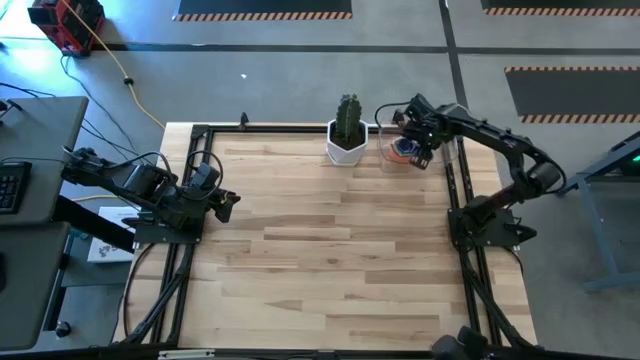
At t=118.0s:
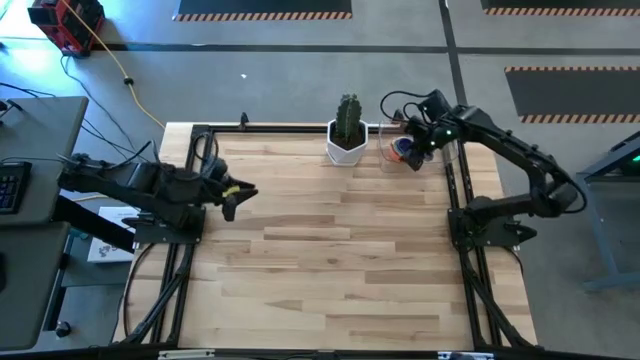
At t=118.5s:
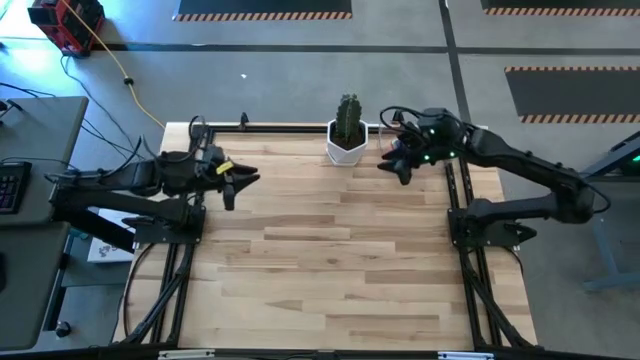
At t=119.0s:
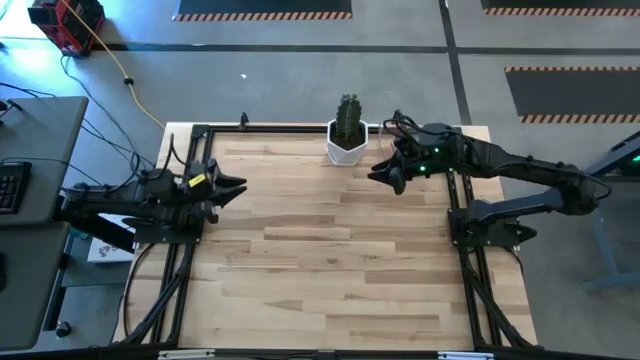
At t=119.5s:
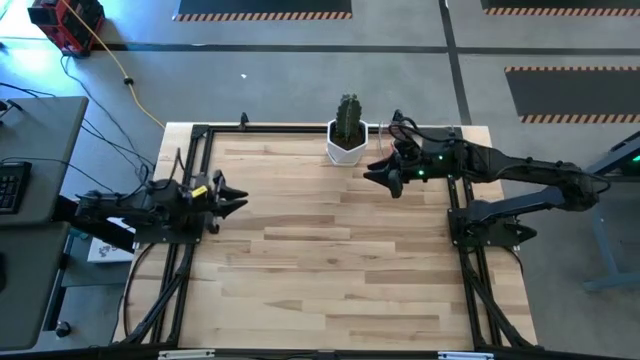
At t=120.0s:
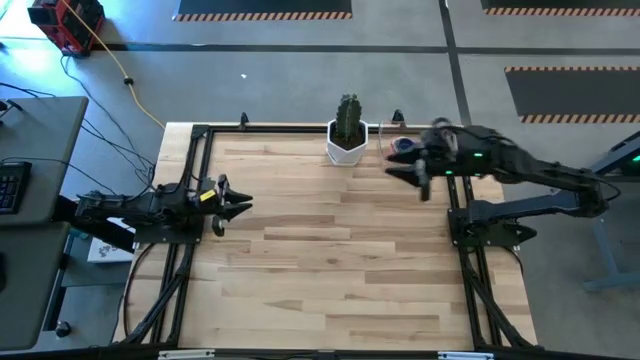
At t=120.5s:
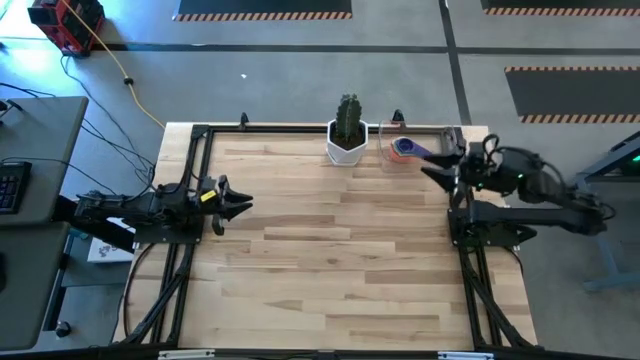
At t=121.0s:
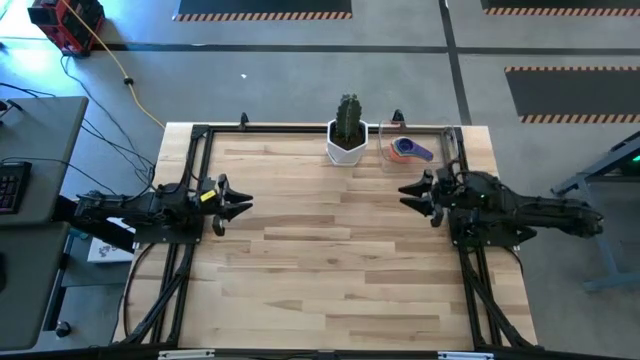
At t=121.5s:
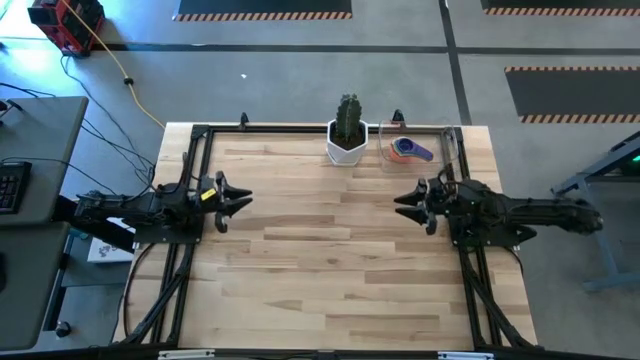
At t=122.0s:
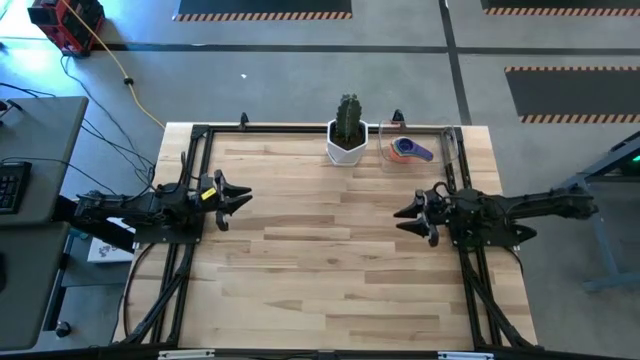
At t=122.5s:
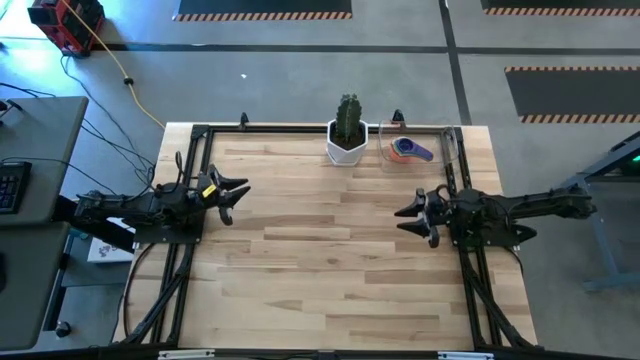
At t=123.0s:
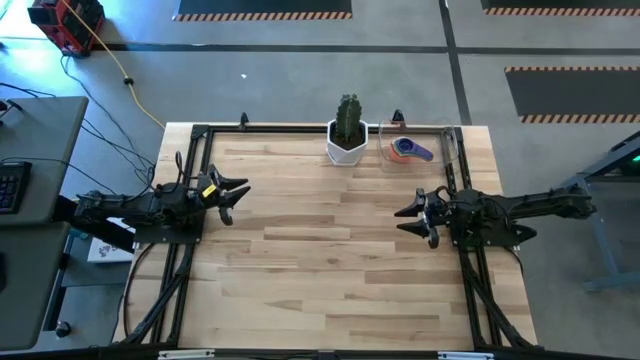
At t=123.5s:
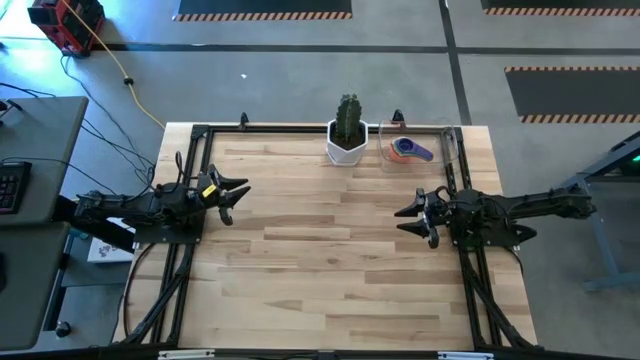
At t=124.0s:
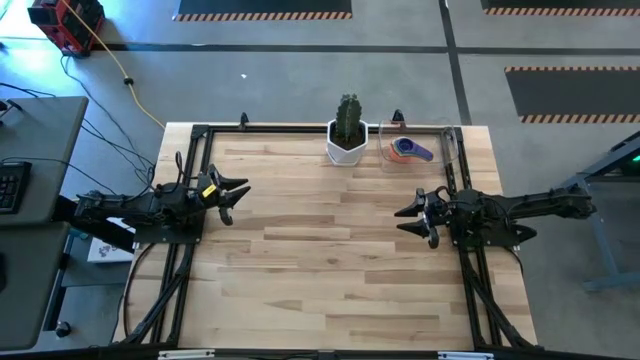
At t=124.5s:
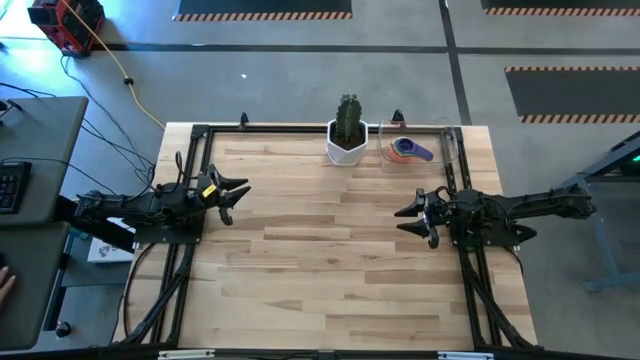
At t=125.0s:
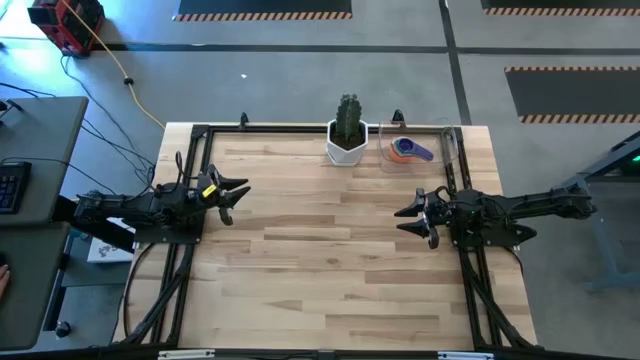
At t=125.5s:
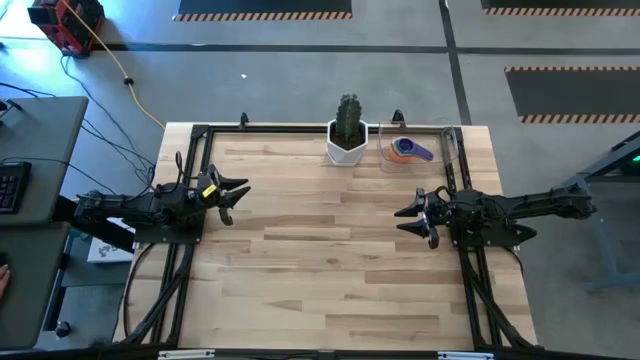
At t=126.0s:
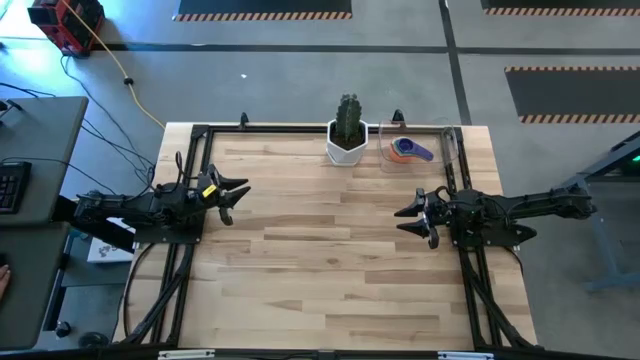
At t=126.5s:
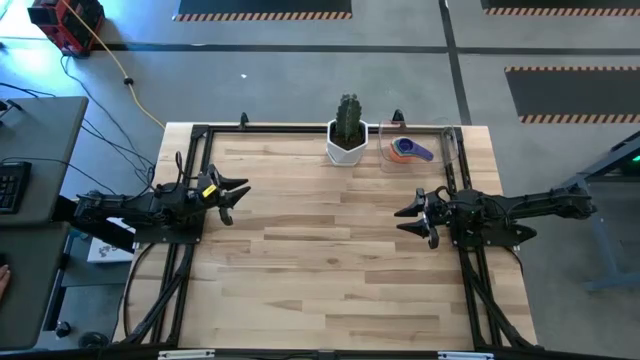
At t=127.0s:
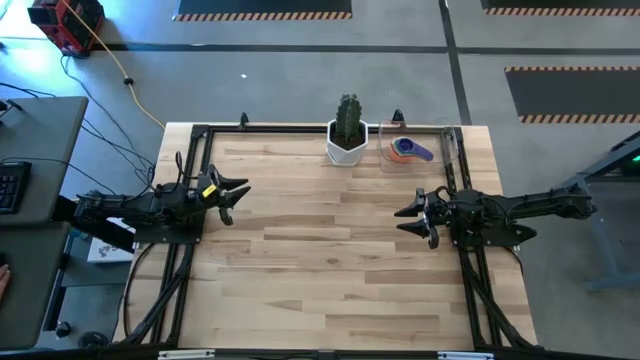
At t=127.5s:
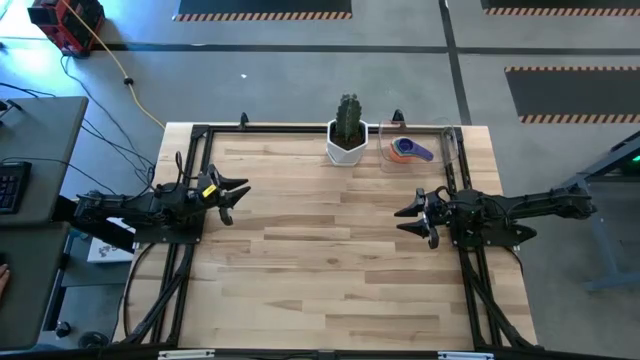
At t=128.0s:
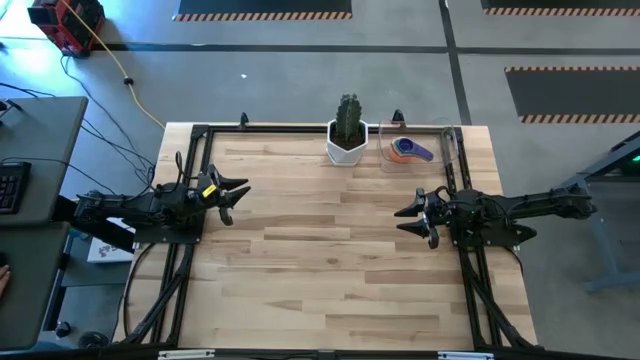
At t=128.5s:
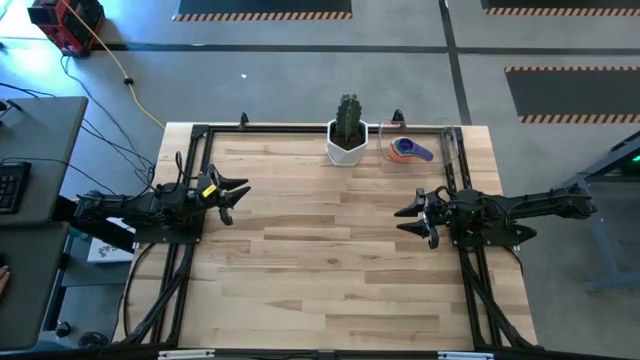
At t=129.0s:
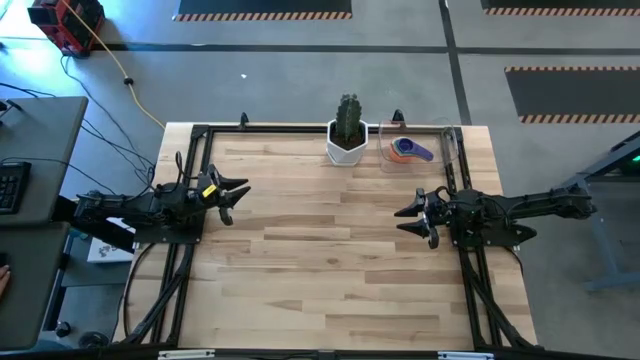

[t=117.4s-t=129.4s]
Task: Nest measuring cups in basket
Return to Home Position

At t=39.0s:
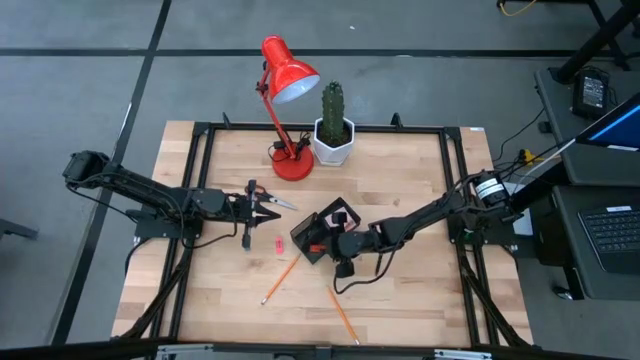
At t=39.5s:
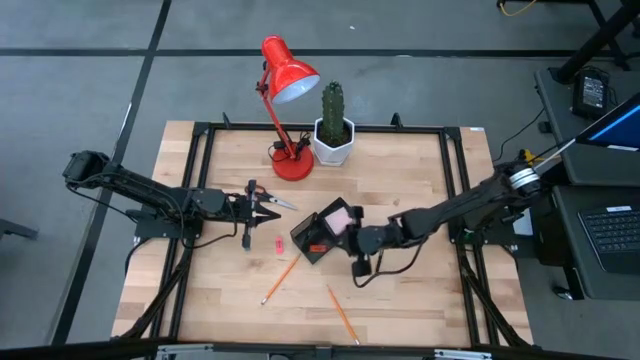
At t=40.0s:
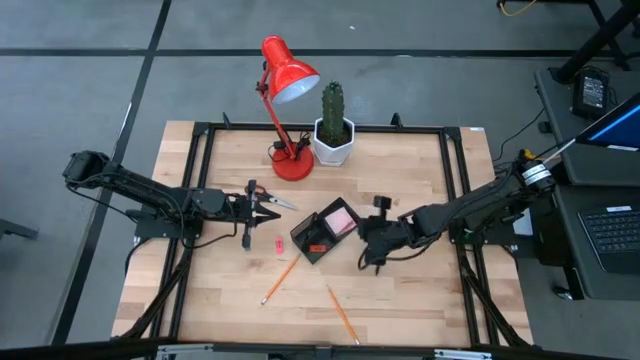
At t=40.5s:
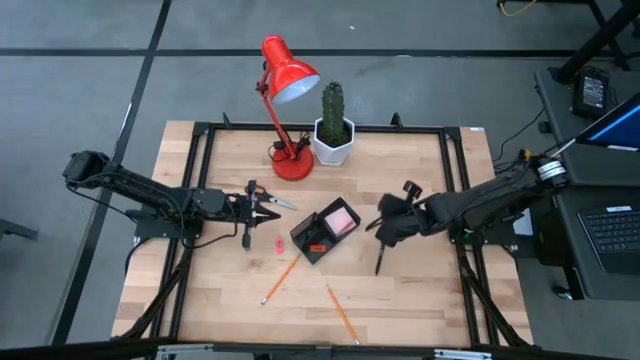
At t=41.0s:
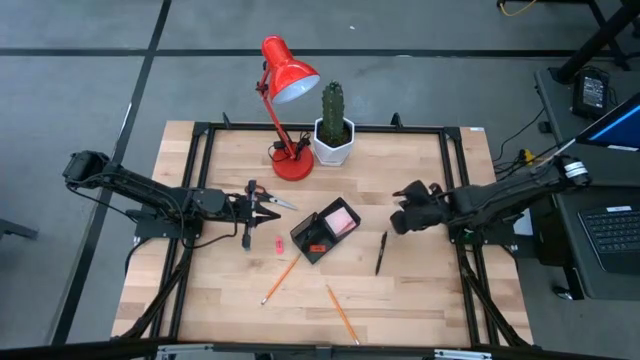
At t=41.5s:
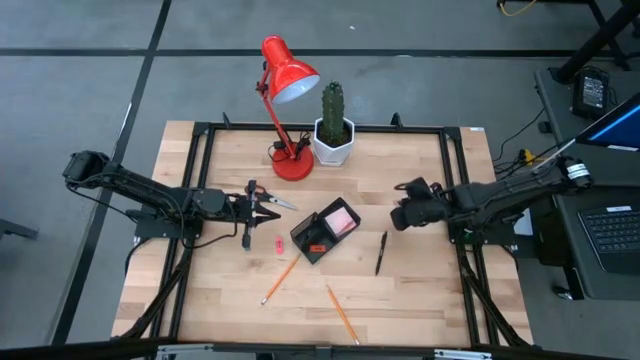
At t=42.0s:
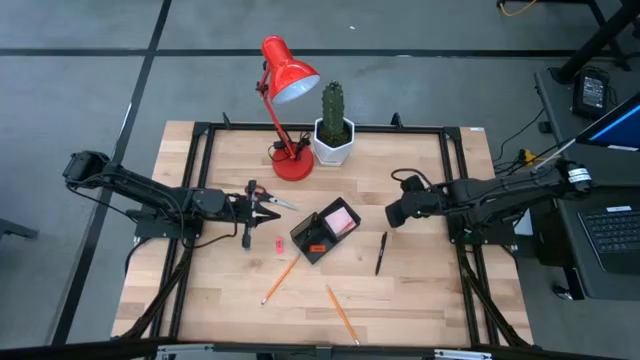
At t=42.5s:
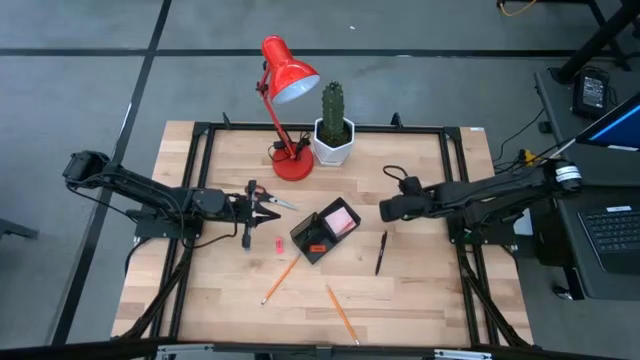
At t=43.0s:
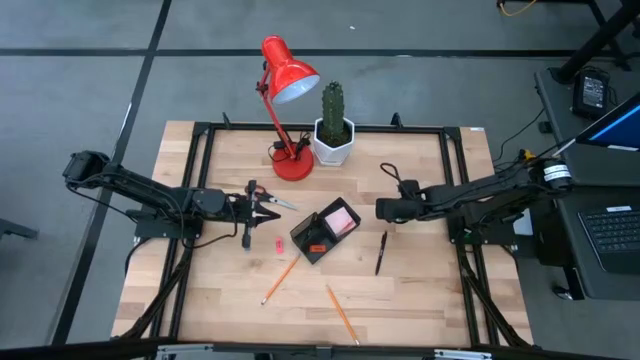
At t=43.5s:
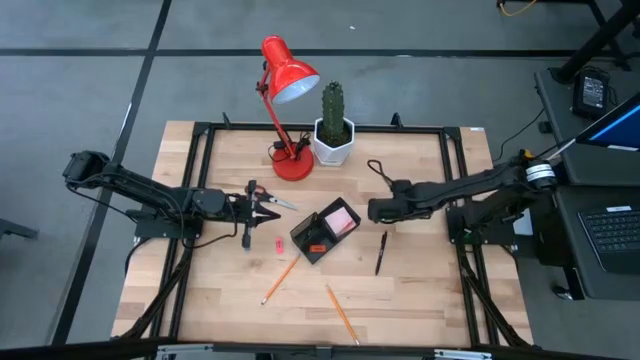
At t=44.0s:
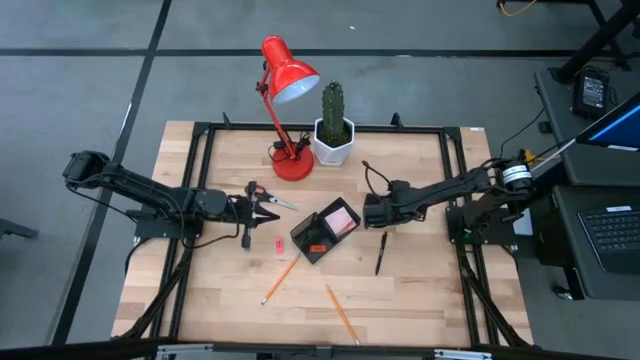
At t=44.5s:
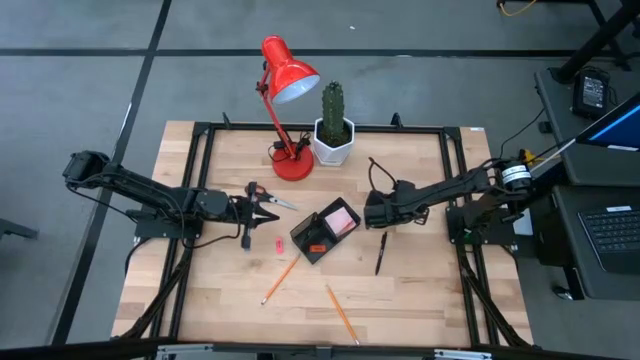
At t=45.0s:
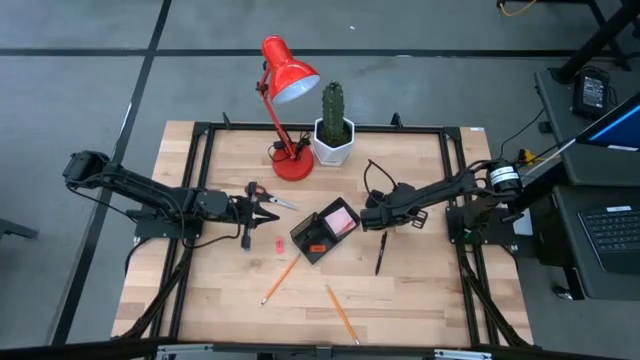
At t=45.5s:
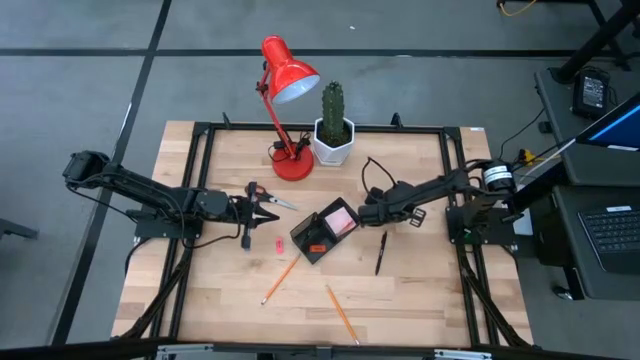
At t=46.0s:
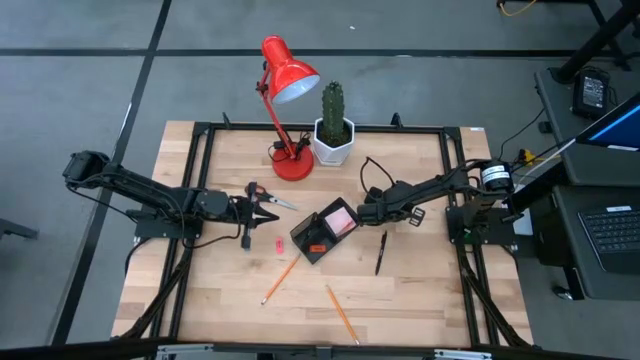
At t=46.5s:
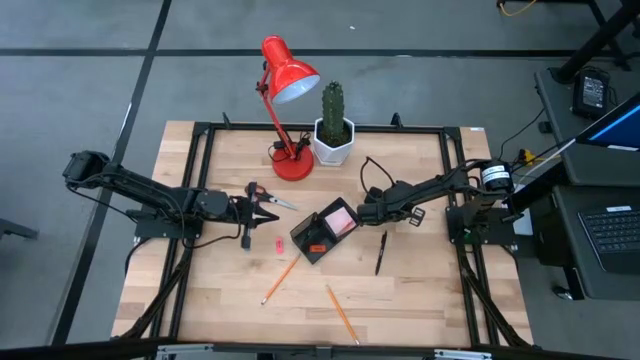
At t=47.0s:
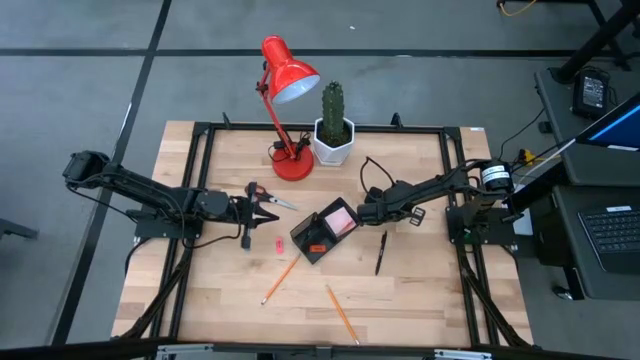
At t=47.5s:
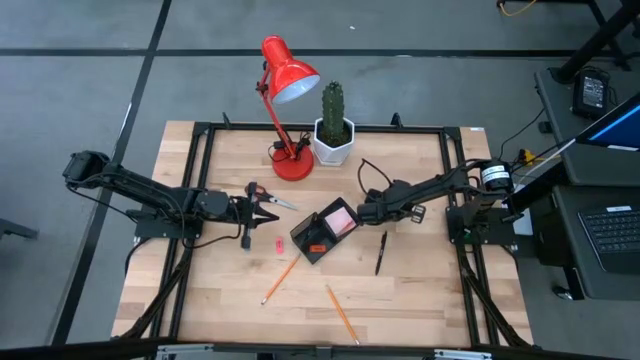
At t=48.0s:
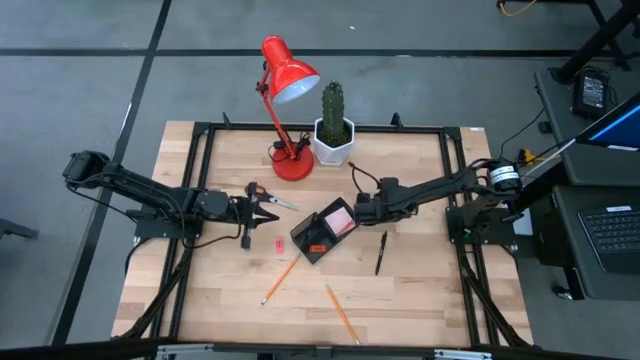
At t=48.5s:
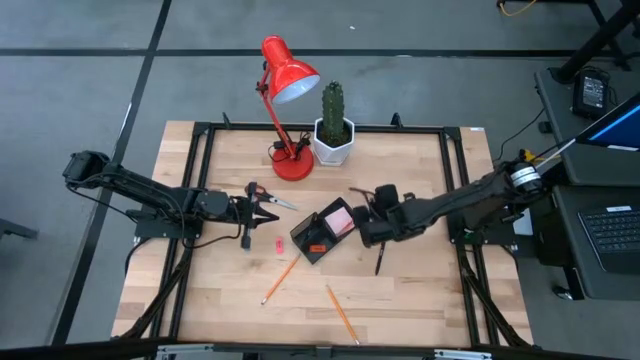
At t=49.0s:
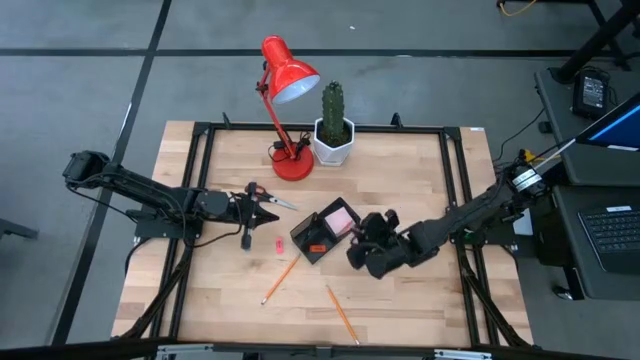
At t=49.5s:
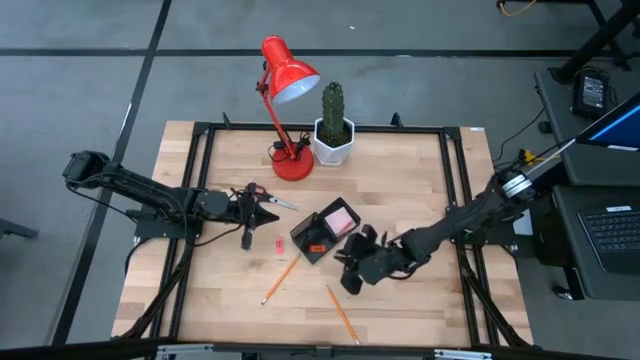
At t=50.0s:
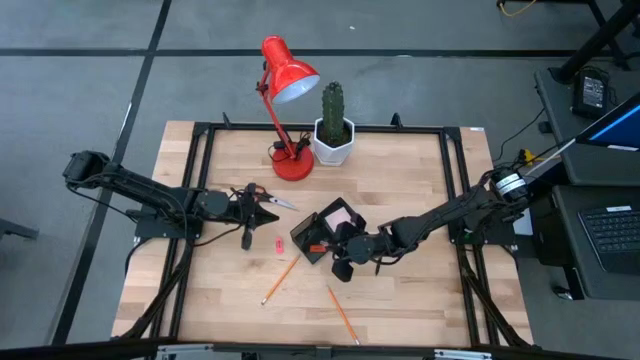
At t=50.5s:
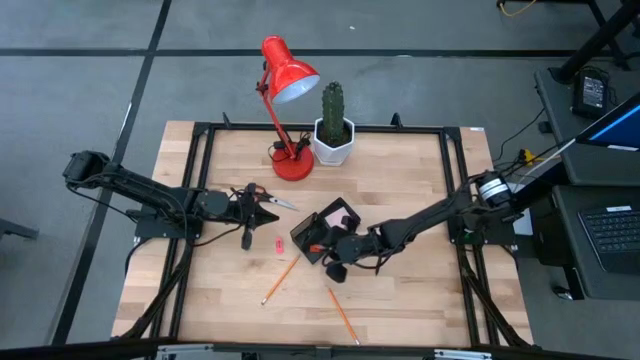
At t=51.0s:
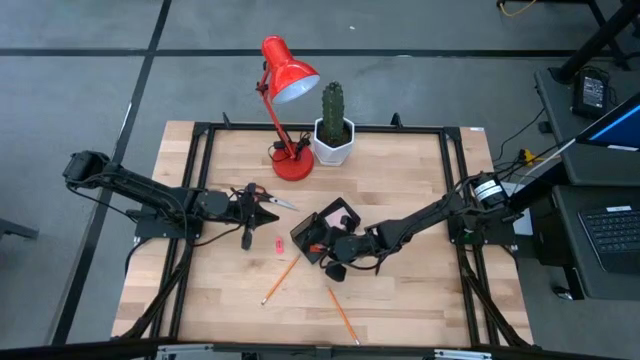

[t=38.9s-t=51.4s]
Task: Pick and place office supplies into organizer
Put the pink binder clip into the black desk organizer
